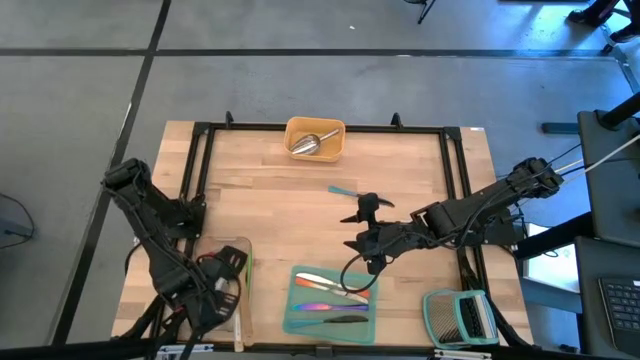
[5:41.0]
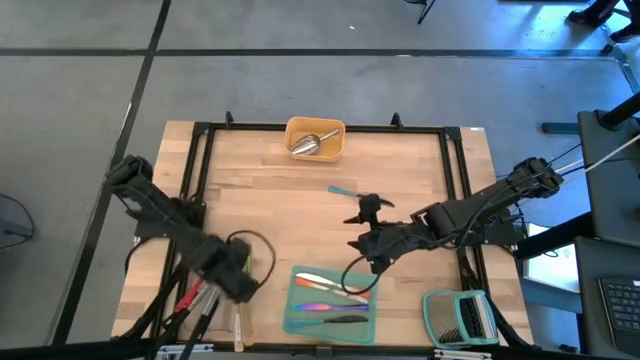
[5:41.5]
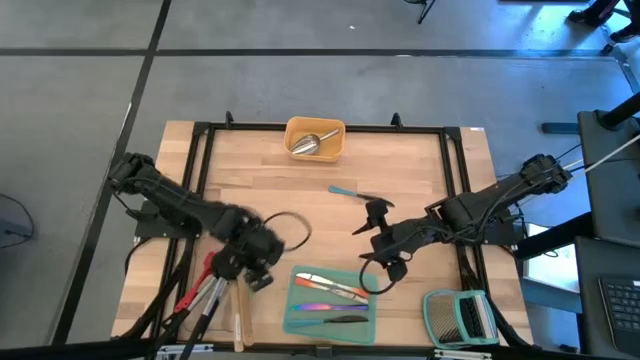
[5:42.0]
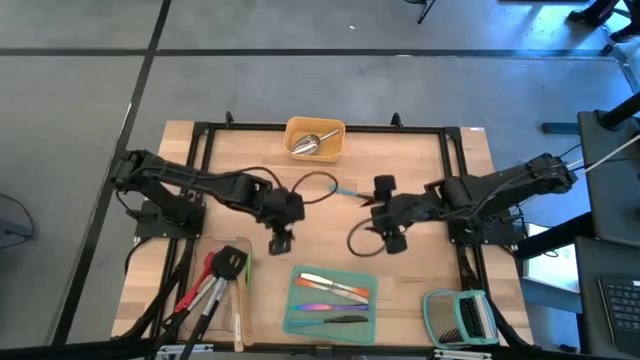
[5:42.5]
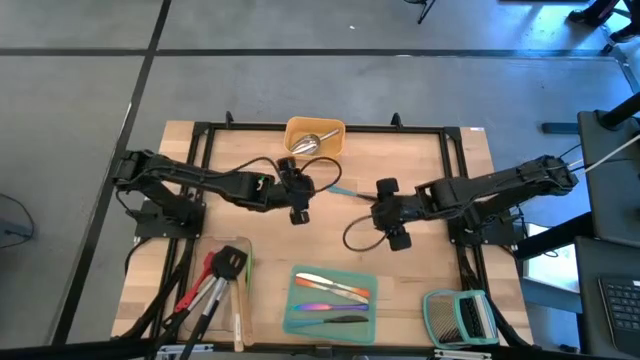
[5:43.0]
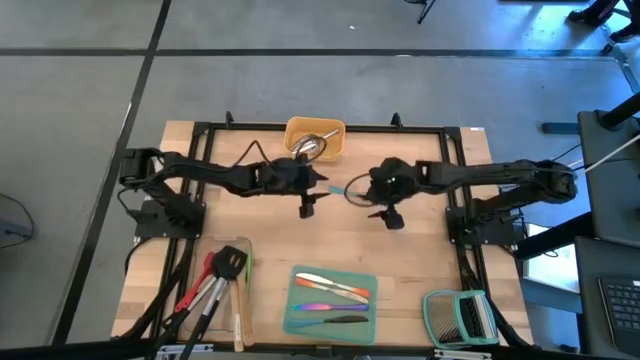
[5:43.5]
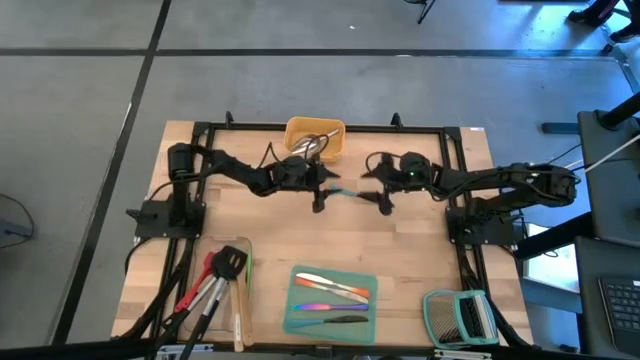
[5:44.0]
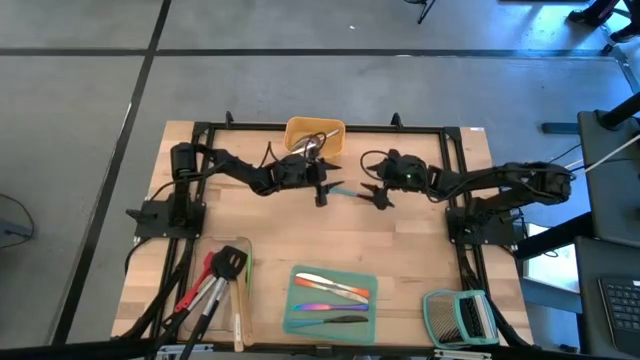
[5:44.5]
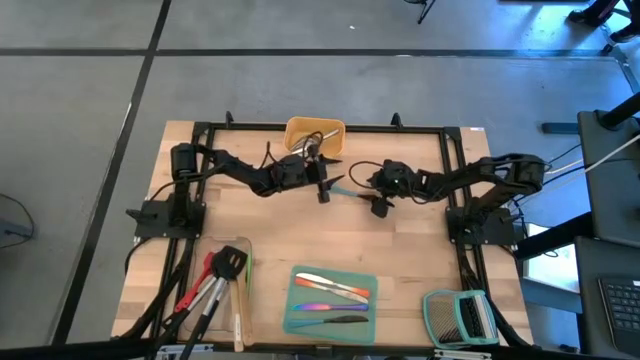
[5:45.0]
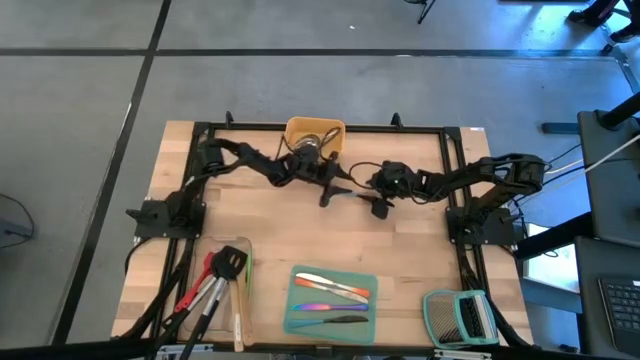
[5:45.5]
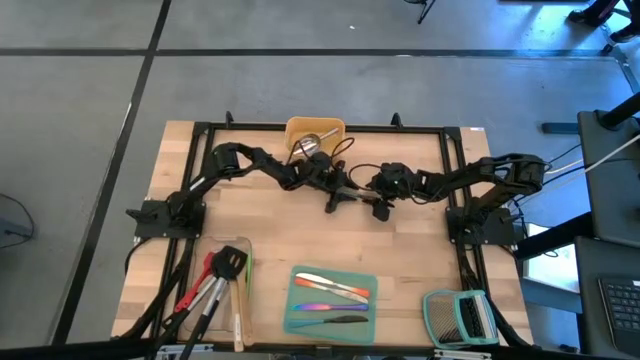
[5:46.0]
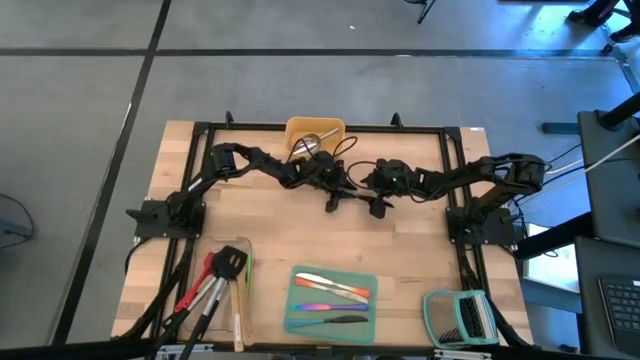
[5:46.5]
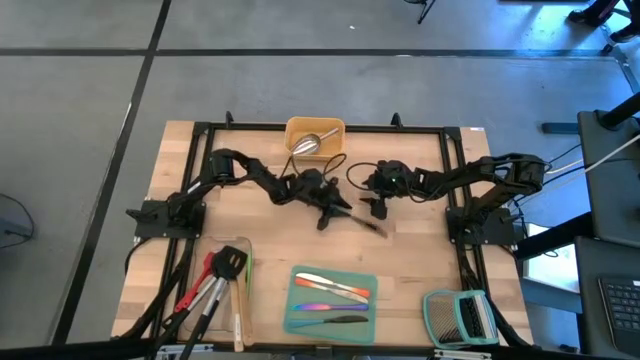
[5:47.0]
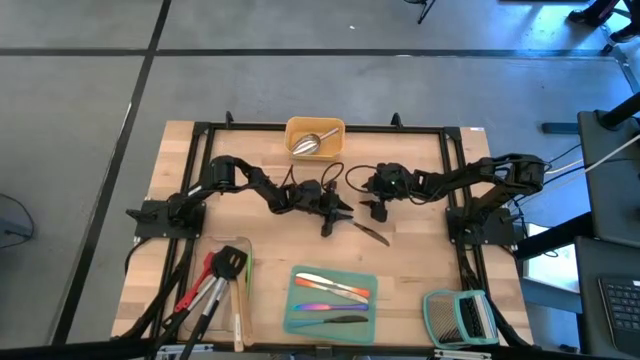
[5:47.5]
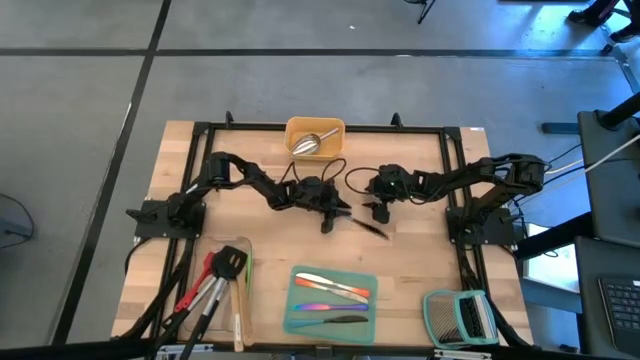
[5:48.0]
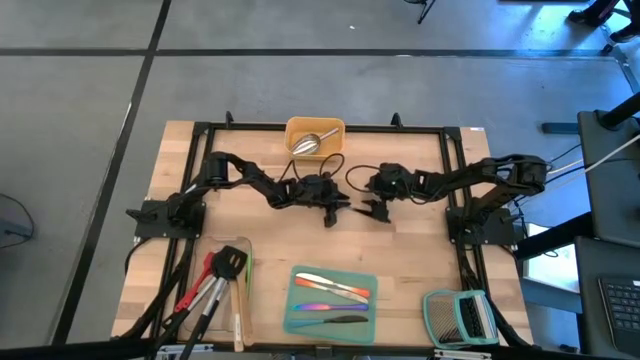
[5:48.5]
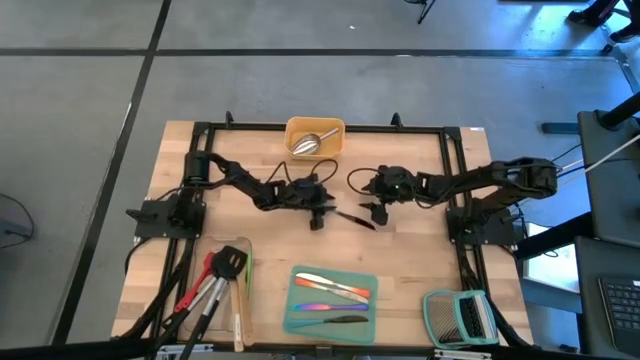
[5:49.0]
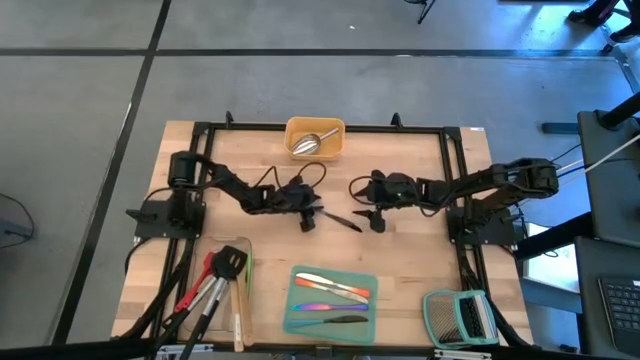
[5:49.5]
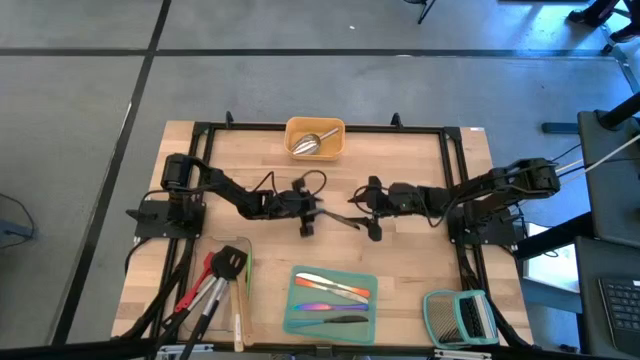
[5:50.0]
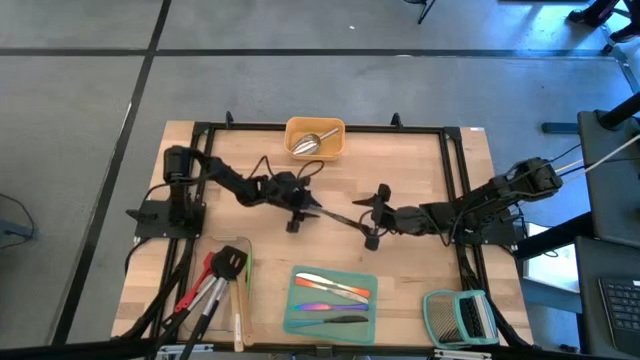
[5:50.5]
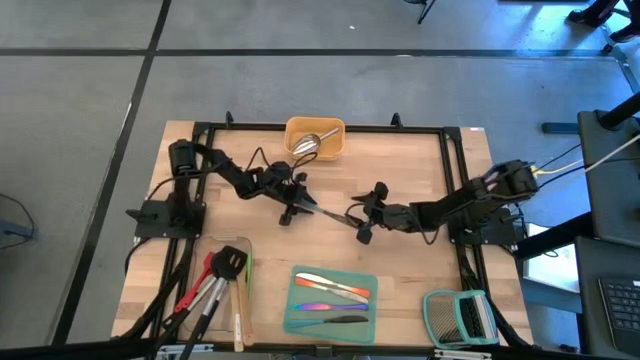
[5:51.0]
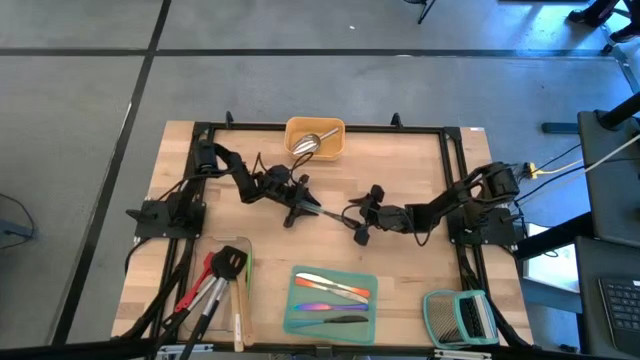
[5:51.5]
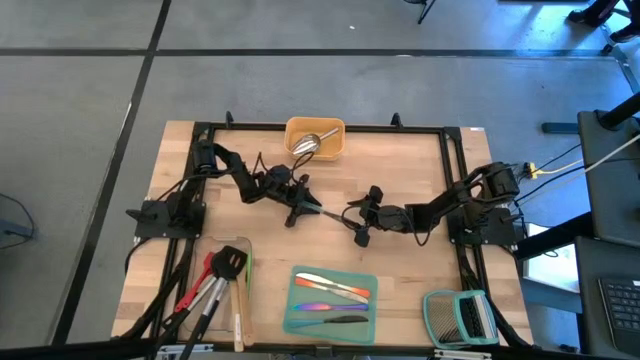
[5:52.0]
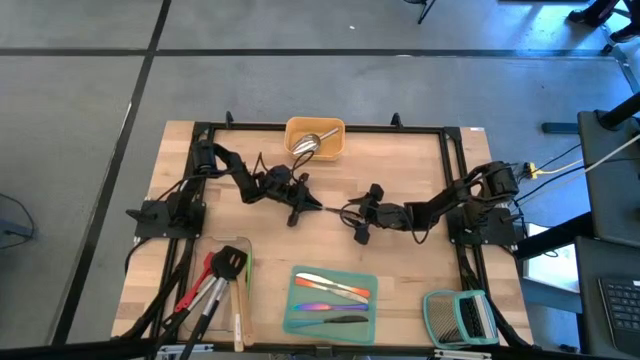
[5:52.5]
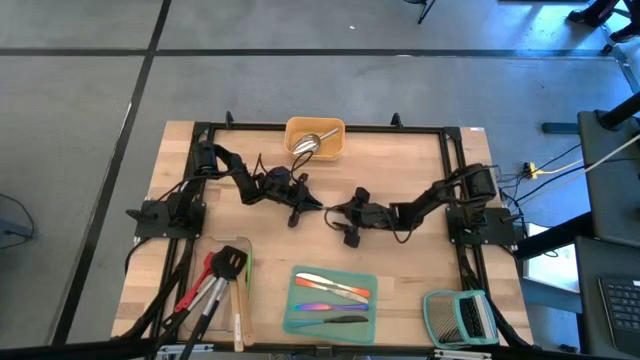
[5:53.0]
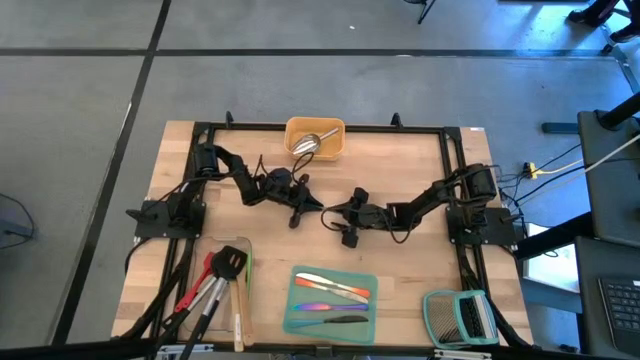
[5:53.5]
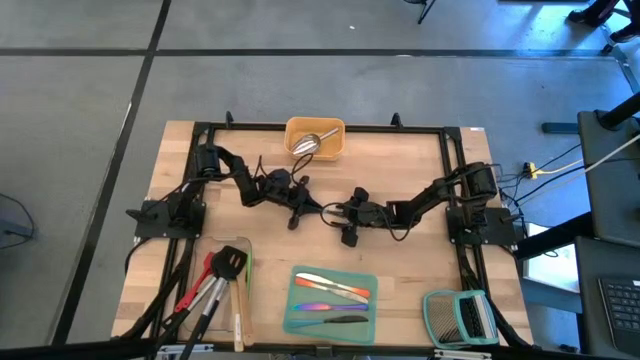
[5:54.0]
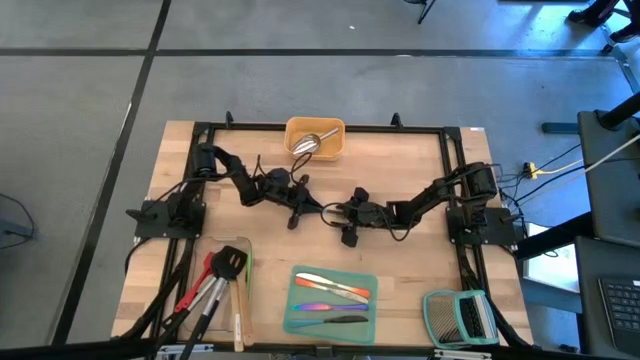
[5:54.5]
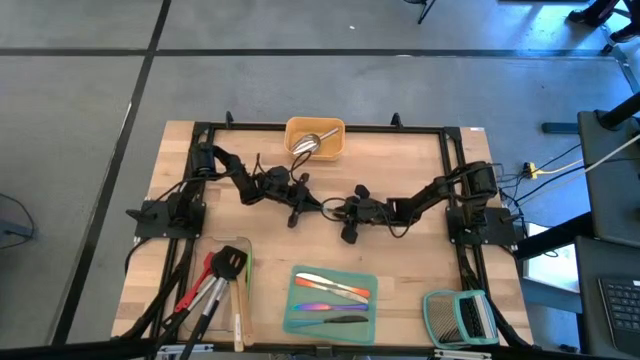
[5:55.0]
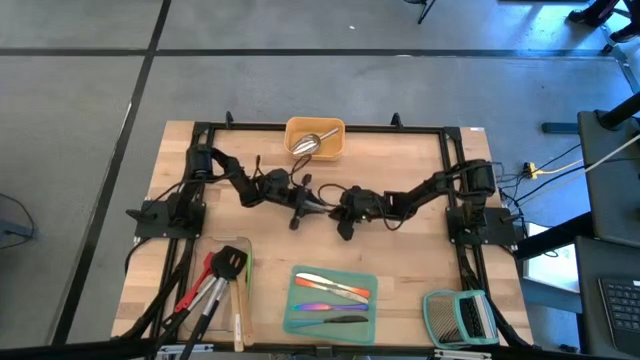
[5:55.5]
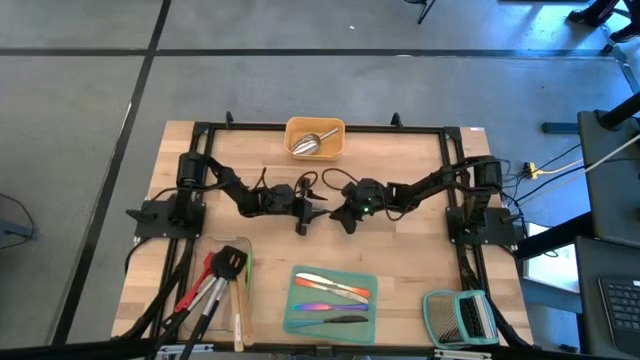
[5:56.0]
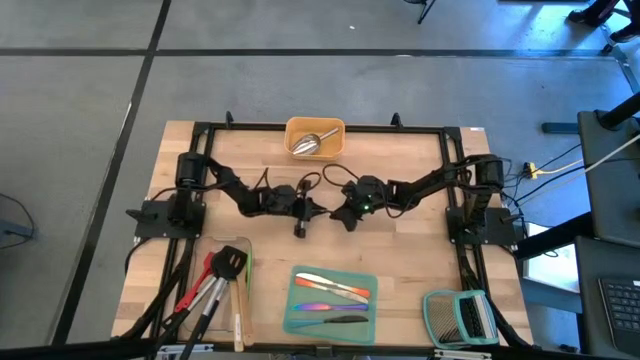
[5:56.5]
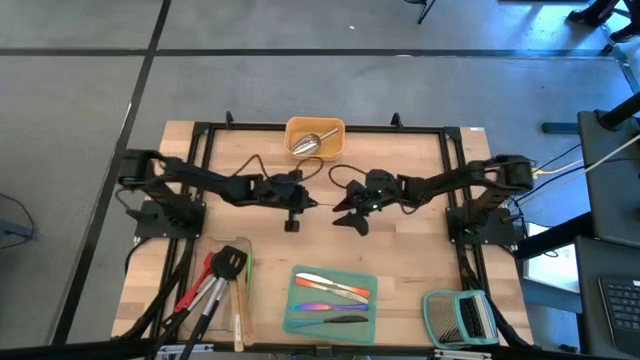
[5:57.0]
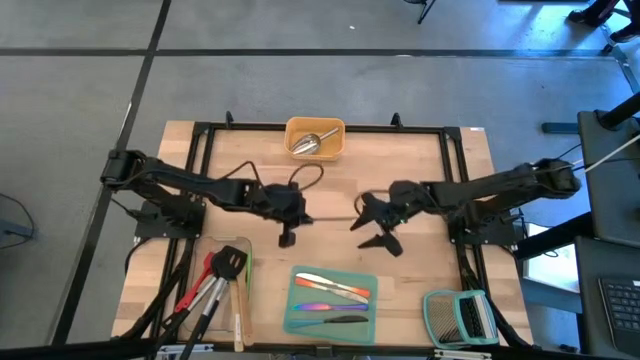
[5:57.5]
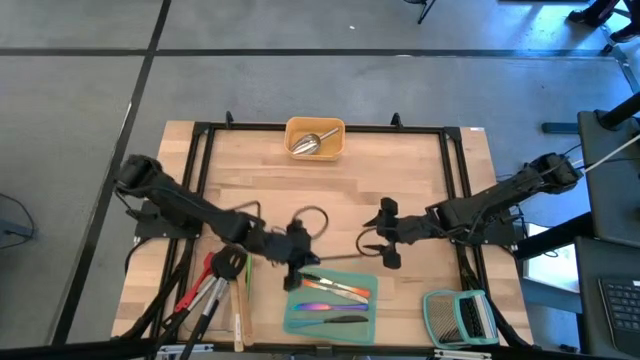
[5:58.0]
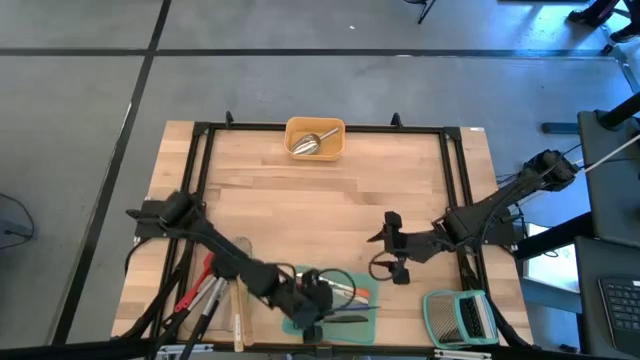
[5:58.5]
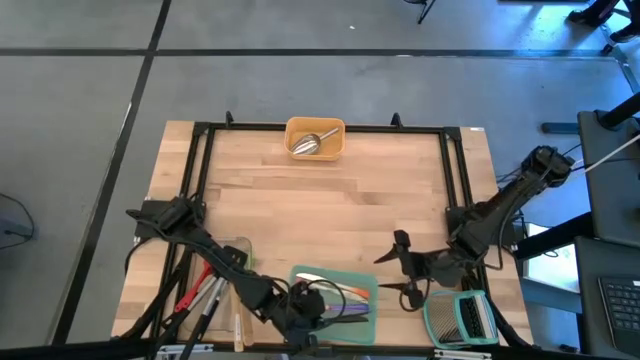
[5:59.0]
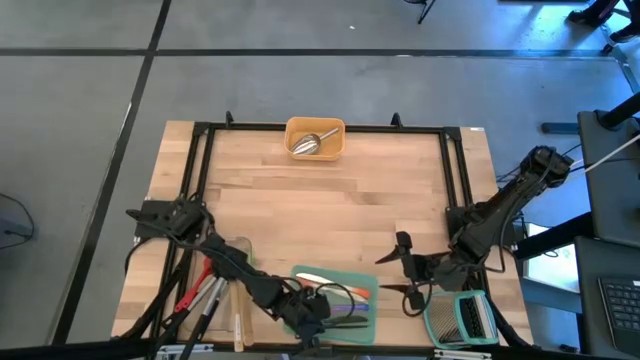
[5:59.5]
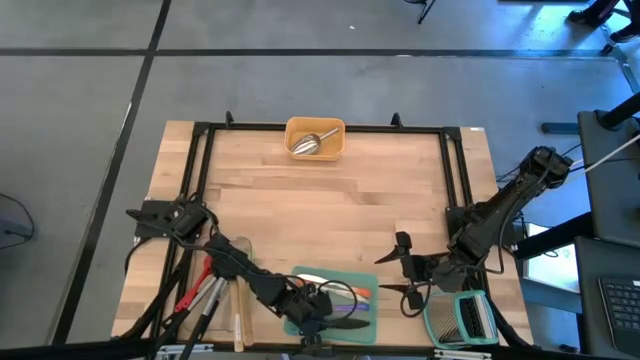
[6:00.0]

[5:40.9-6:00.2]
Task: Pick & Place Kitchen Items
Put the blue table knife into the green bin

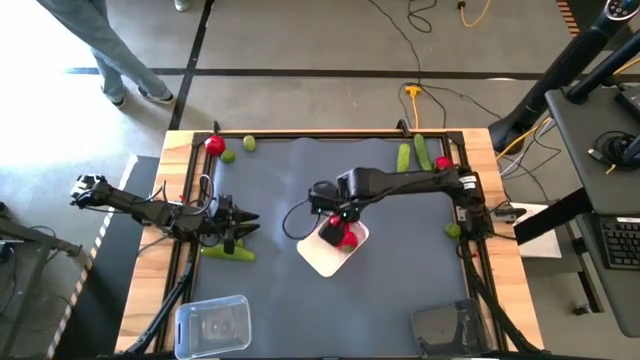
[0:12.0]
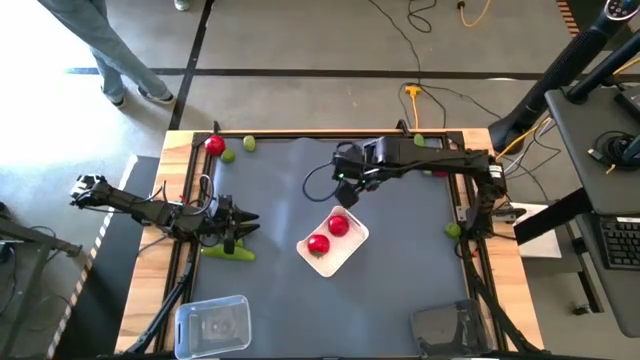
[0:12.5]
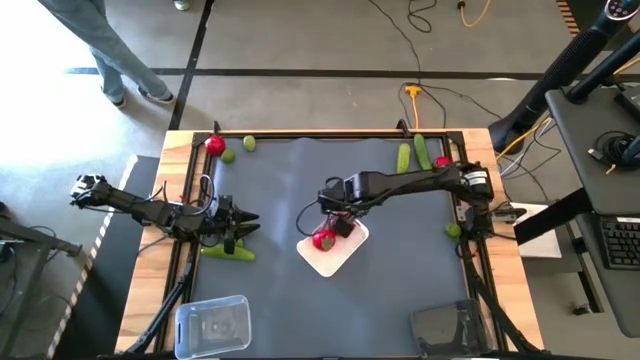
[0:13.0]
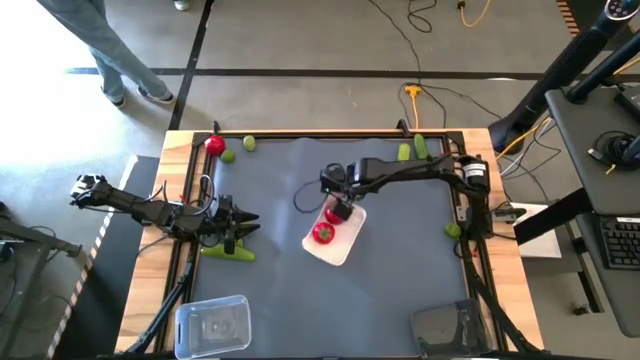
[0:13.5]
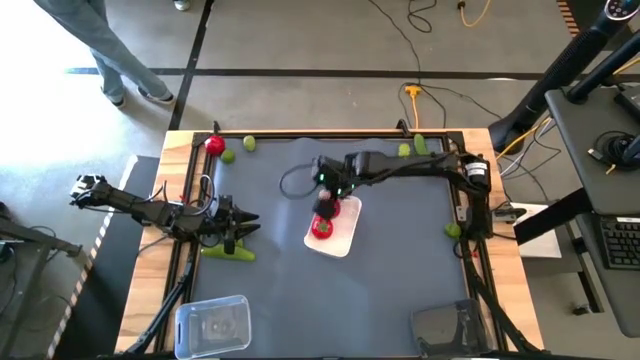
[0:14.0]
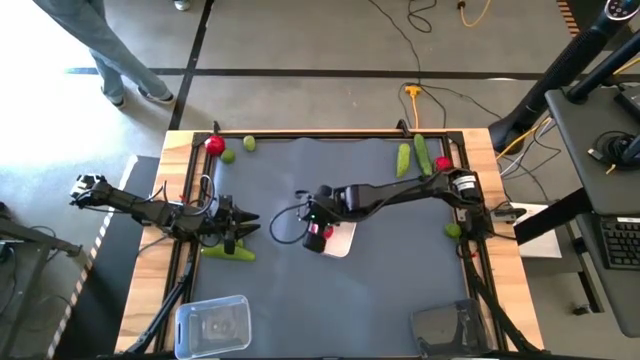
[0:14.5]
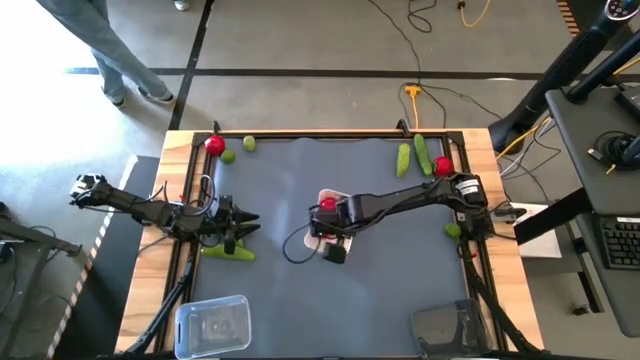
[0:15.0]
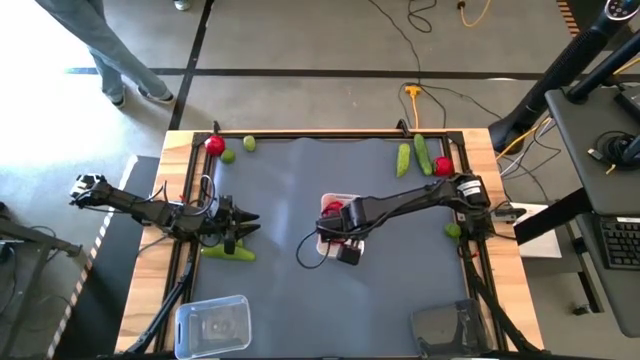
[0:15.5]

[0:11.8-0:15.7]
Task: Sort produce into baskets
Adjust the white bin
